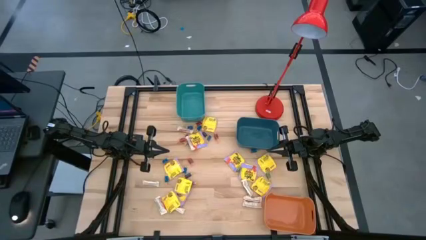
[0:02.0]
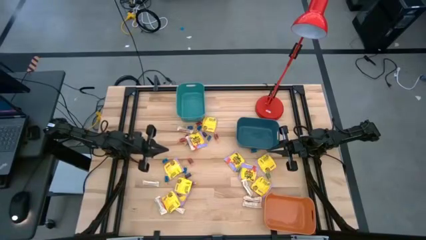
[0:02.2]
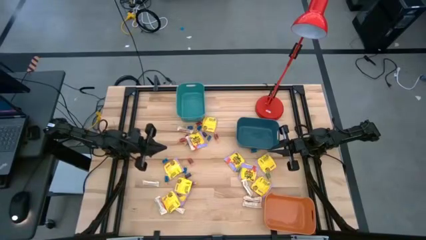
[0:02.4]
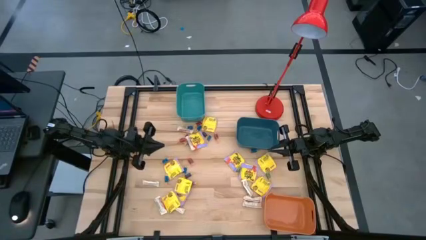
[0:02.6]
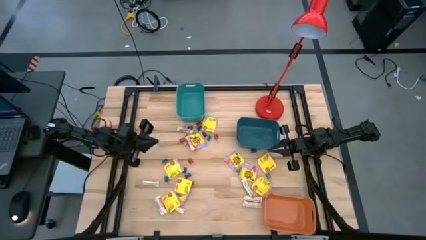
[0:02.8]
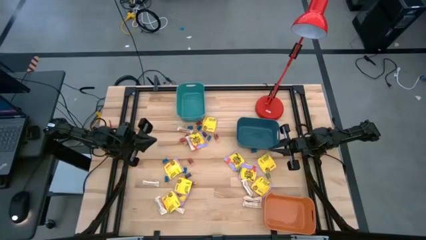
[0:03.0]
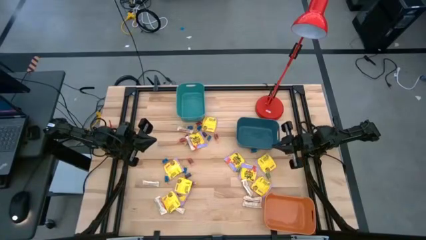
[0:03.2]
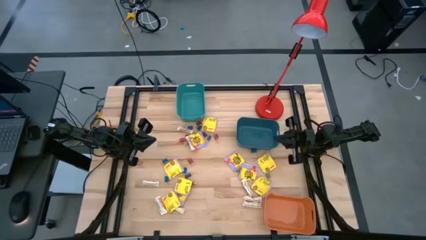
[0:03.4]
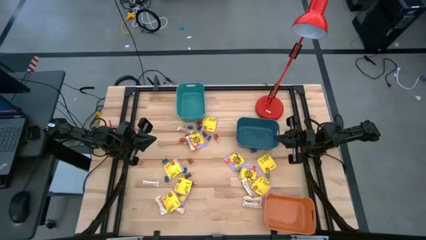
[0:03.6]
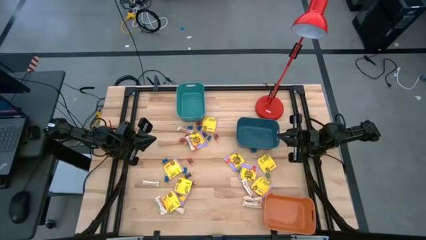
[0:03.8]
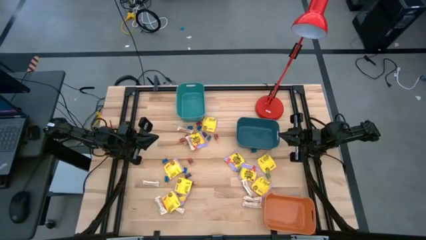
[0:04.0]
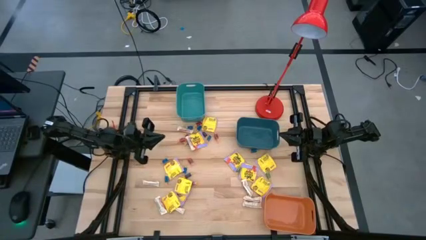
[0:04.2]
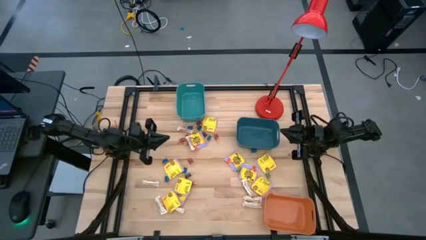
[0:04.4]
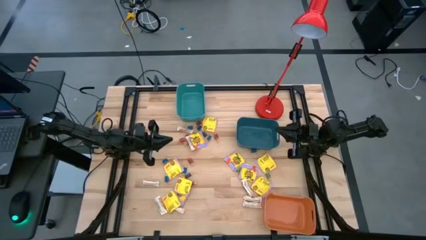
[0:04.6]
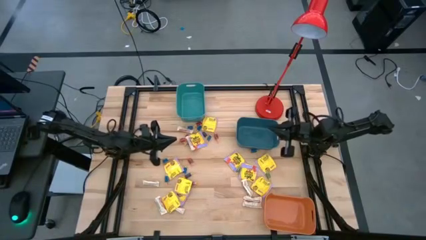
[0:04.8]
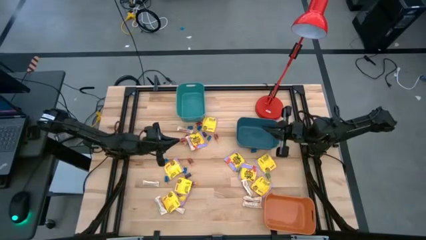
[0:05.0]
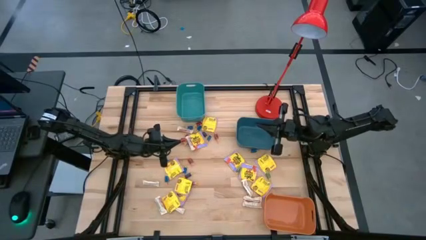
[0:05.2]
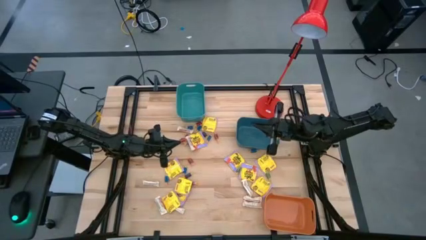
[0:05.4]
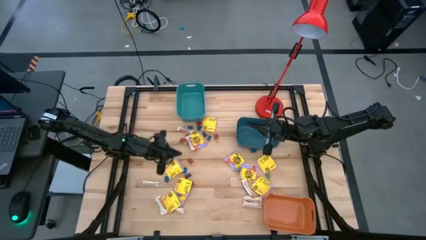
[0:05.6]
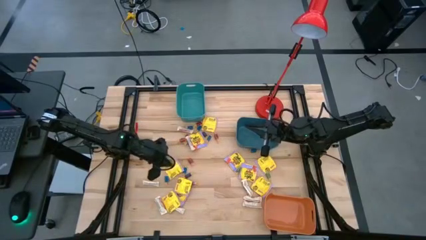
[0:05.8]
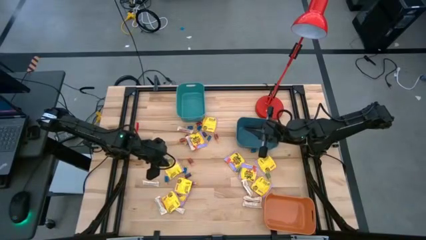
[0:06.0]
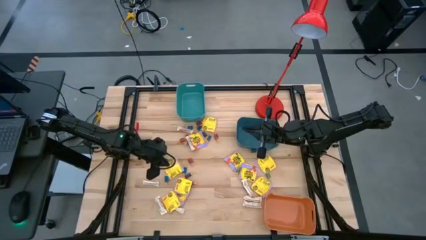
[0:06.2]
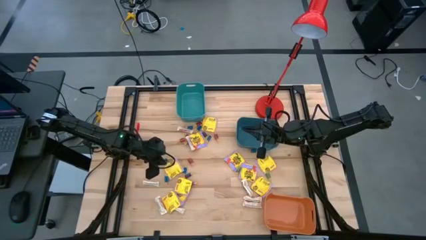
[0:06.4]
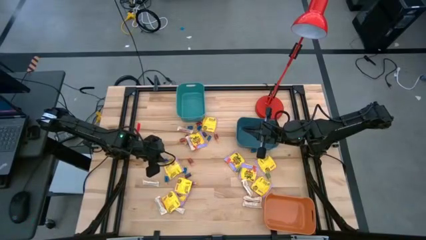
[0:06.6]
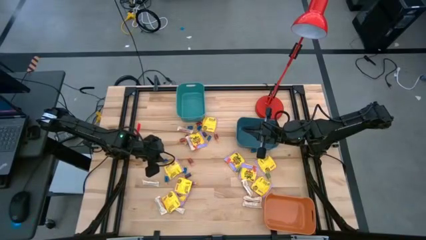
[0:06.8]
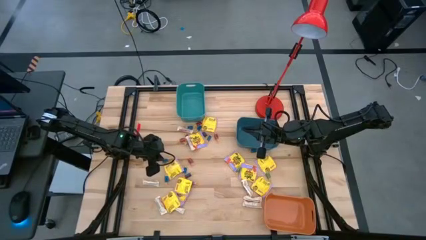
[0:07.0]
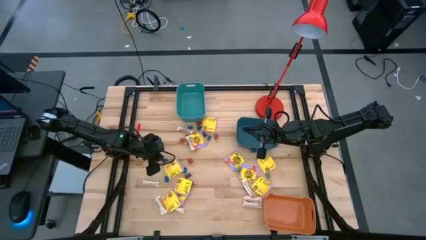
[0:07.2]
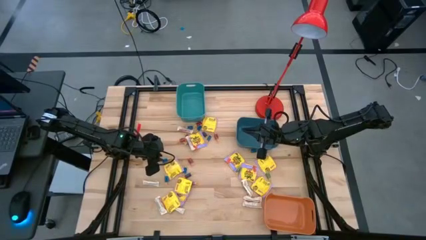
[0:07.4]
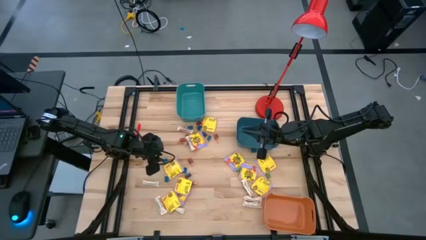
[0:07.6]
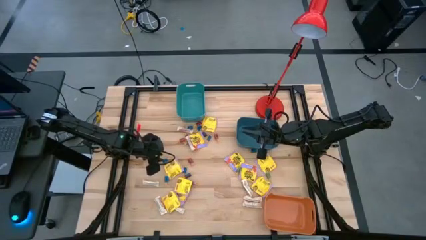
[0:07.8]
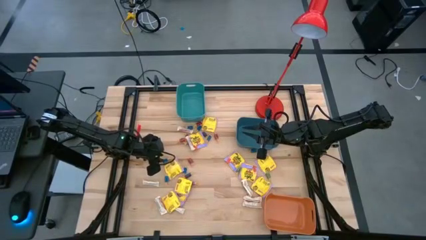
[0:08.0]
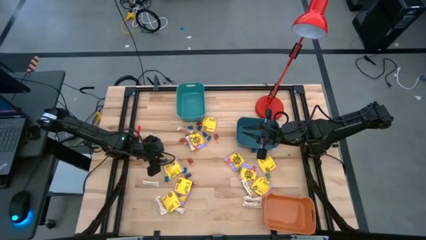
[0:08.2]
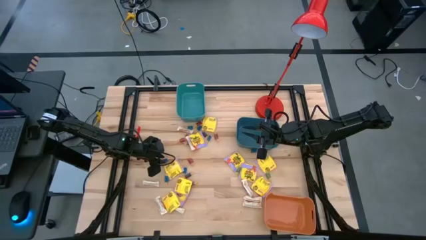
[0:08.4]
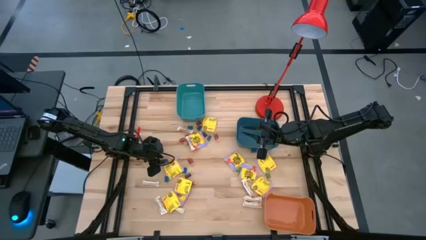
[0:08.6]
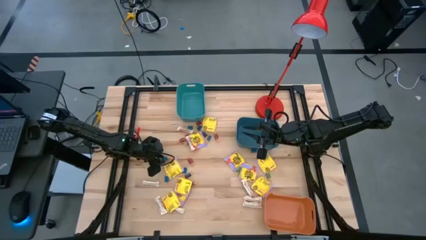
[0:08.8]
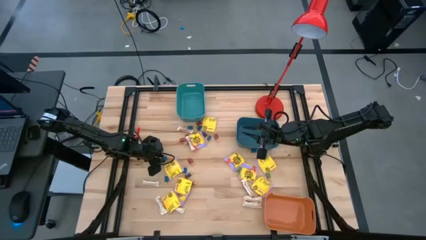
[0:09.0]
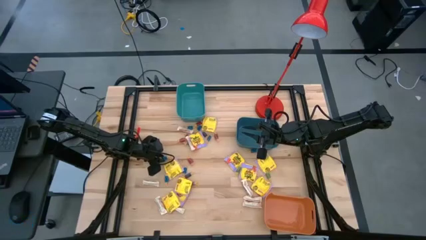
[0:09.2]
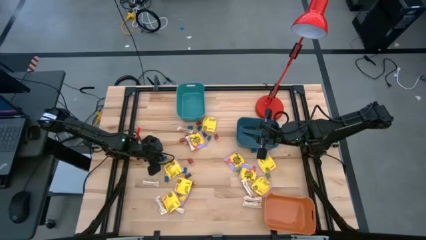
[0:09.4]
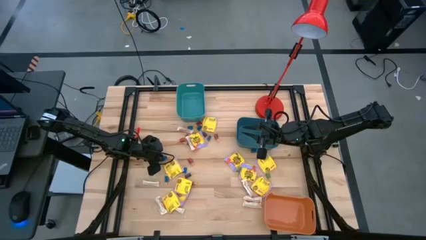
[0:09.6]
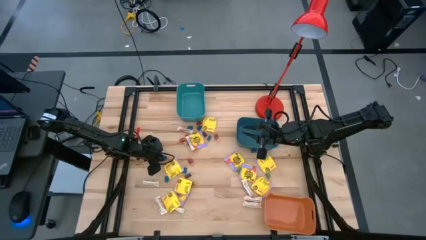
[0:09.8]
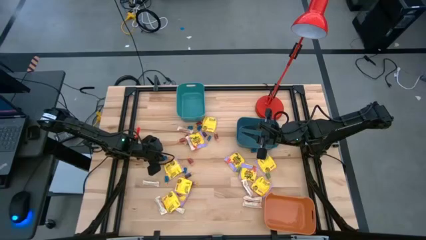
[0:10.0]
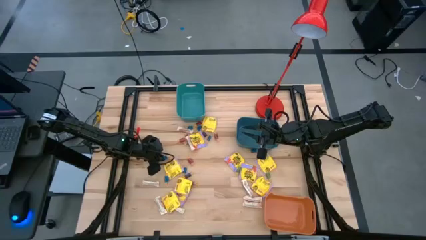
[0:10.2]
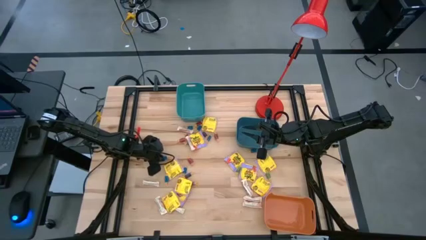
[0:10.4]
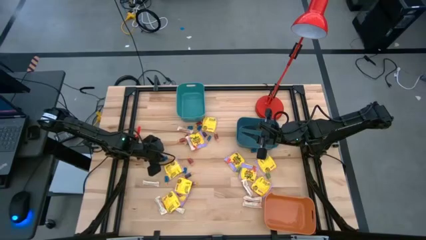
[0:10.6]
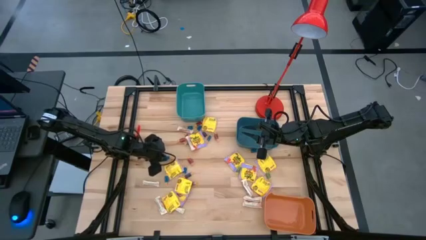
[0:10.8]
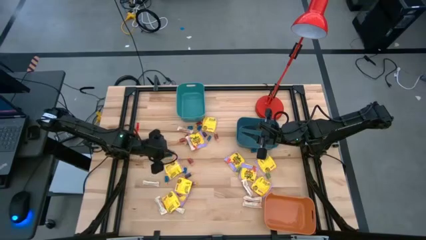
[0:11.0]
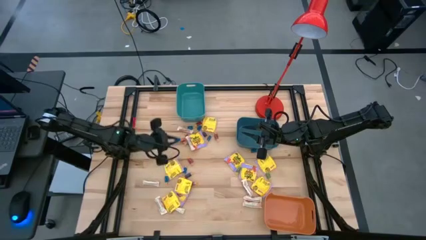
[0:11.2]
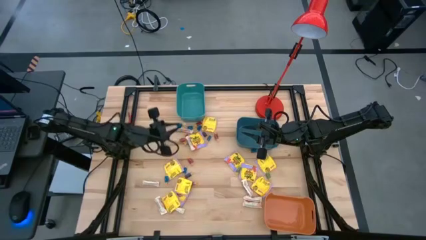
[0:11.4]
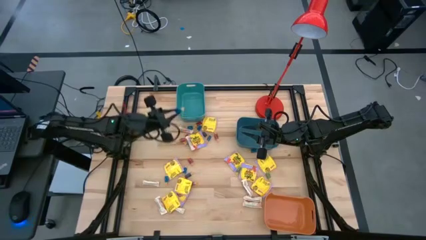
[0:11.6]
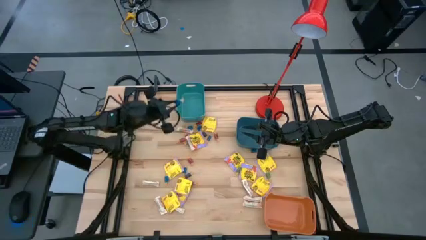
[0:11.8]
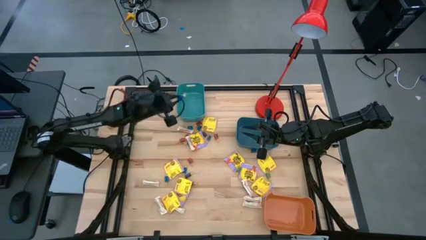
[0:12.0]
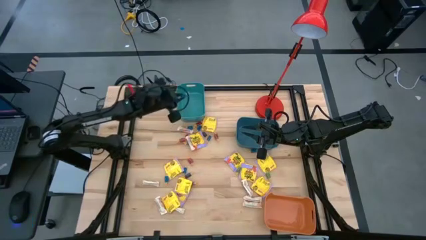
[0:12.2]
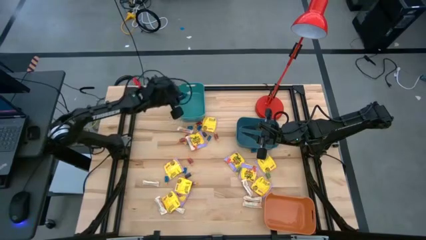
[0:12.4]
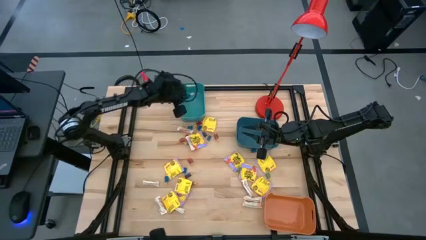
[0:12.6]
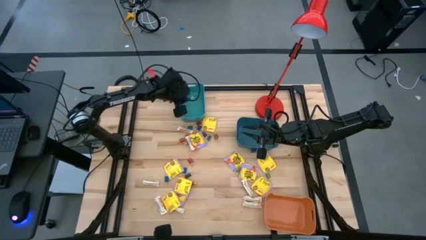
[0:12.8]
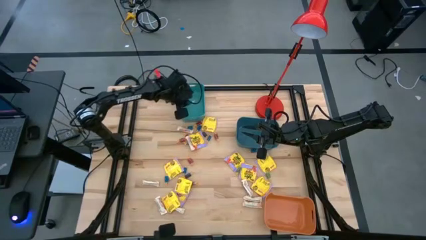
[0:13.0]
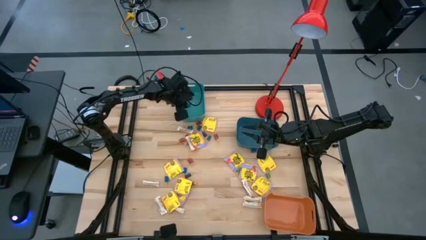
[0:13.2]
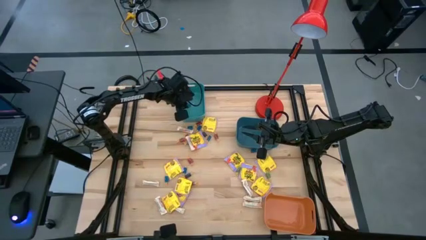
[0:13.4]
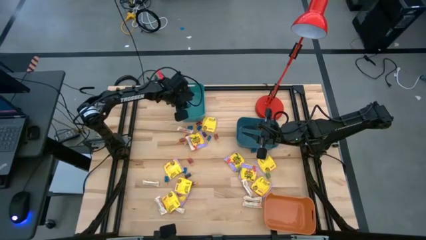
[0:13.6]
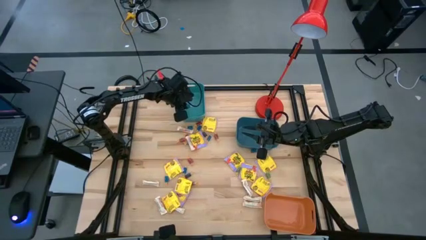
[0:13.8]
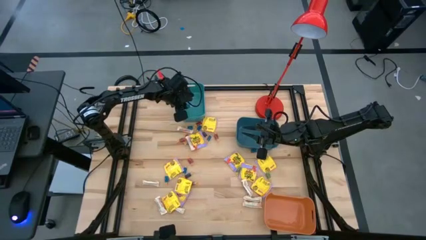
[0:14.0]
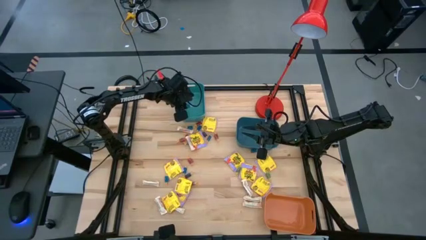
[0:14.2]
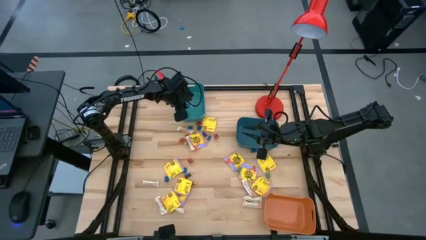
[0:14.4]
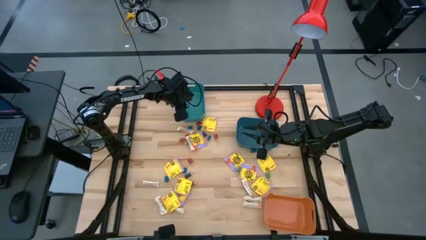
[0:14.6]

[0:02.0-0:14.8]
Task: Sort candy
Put the blue candy into the green bin
